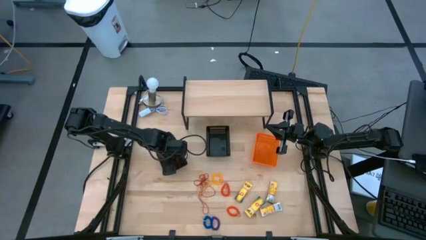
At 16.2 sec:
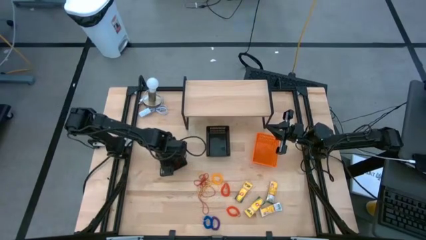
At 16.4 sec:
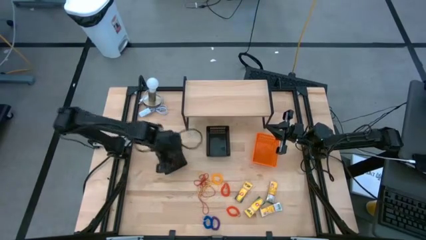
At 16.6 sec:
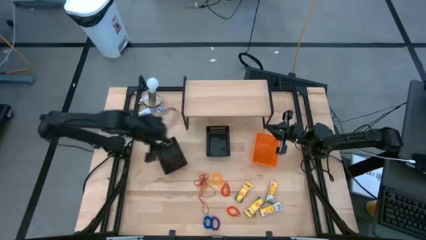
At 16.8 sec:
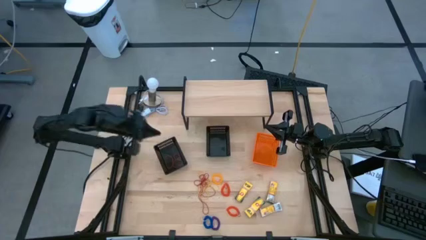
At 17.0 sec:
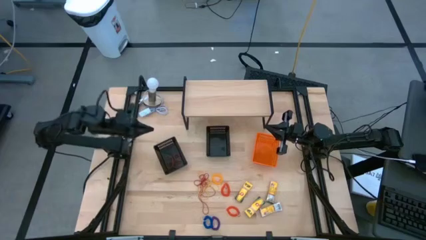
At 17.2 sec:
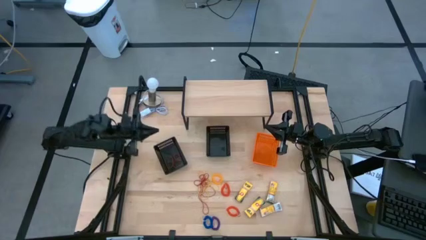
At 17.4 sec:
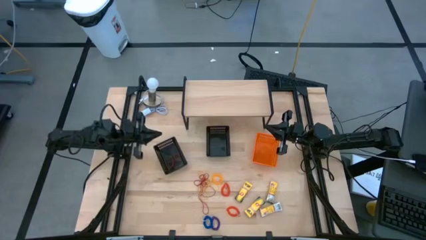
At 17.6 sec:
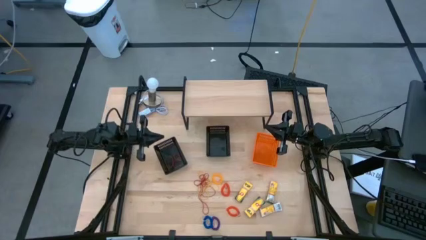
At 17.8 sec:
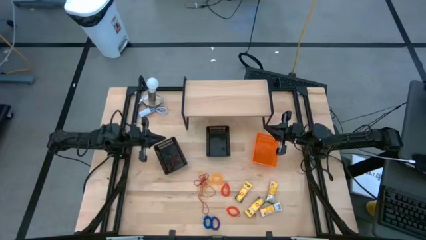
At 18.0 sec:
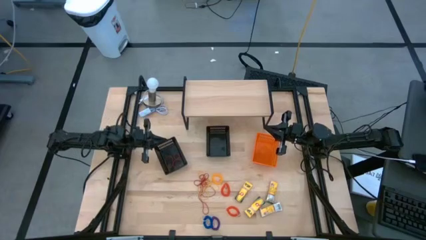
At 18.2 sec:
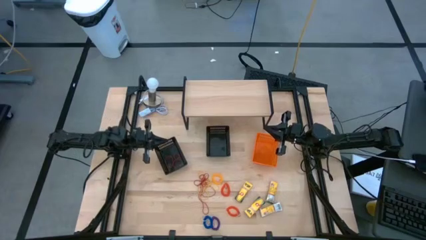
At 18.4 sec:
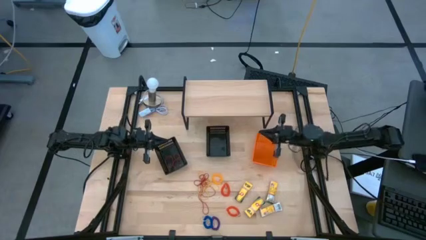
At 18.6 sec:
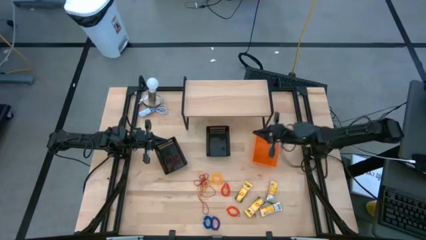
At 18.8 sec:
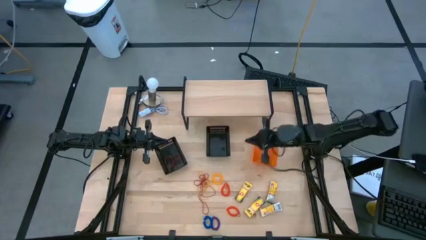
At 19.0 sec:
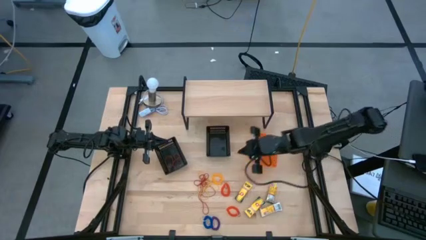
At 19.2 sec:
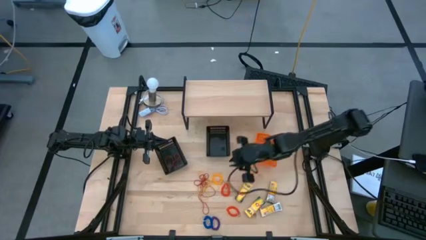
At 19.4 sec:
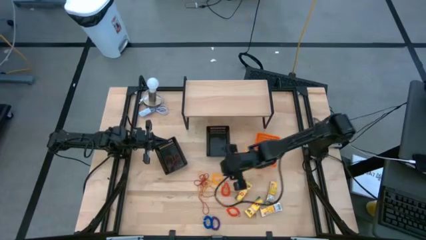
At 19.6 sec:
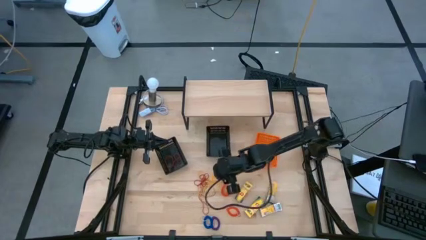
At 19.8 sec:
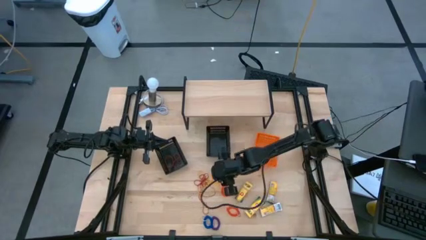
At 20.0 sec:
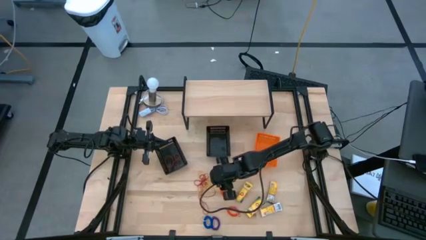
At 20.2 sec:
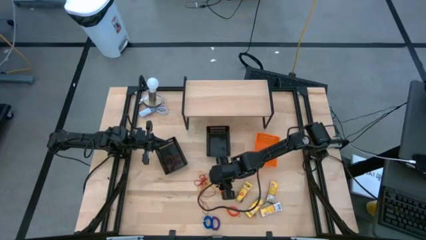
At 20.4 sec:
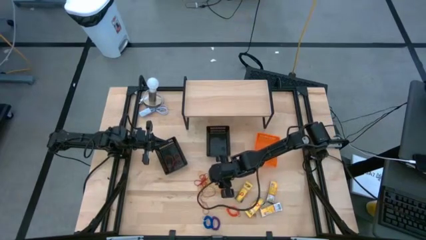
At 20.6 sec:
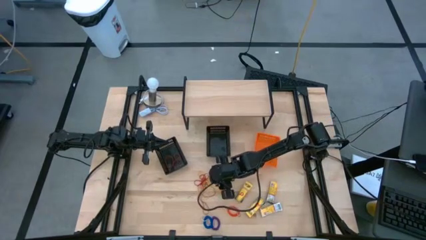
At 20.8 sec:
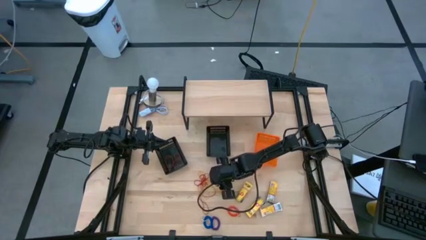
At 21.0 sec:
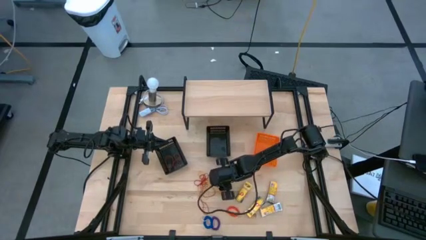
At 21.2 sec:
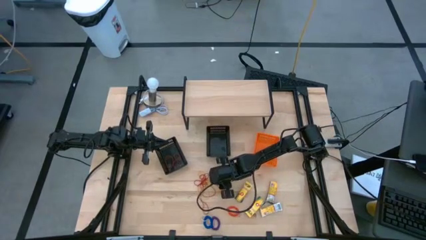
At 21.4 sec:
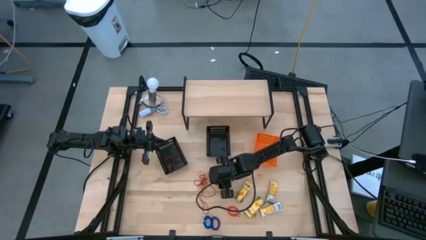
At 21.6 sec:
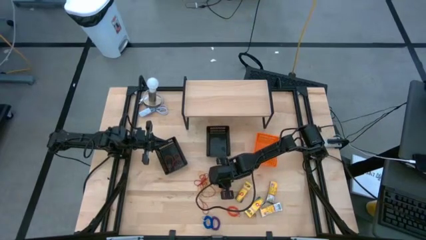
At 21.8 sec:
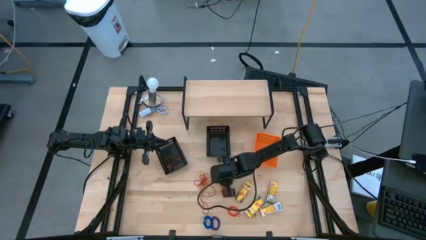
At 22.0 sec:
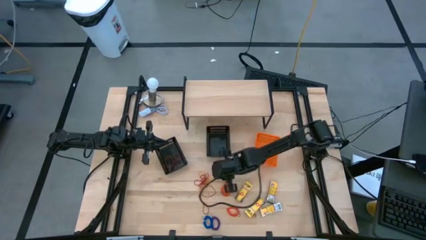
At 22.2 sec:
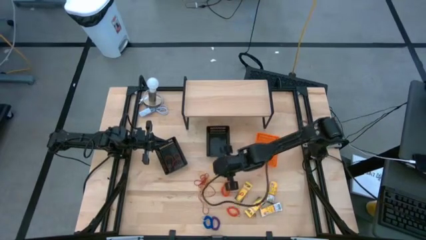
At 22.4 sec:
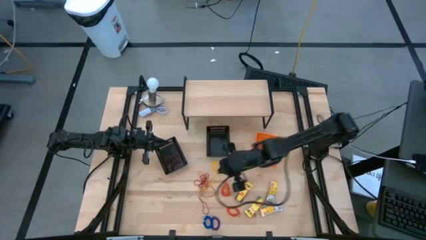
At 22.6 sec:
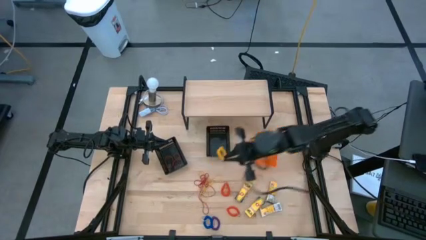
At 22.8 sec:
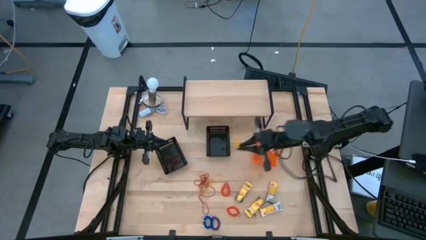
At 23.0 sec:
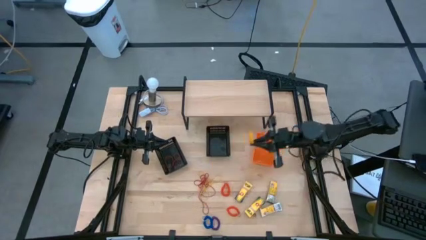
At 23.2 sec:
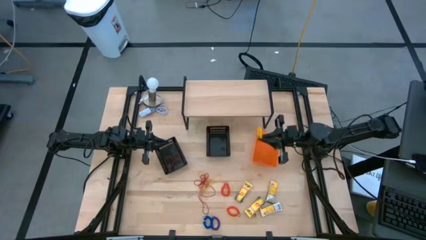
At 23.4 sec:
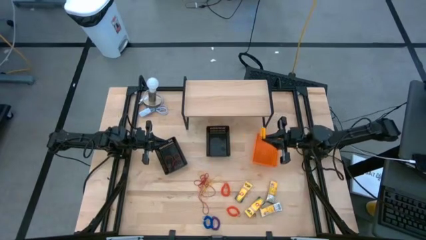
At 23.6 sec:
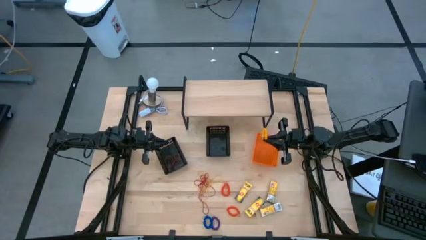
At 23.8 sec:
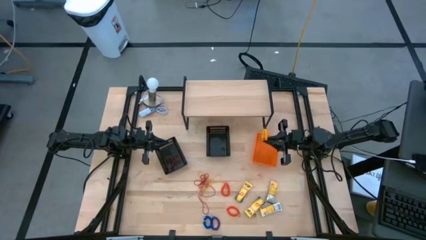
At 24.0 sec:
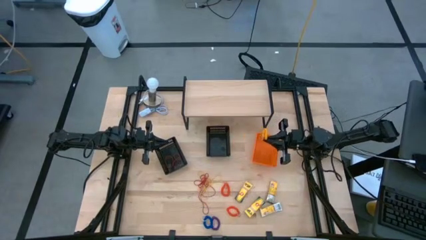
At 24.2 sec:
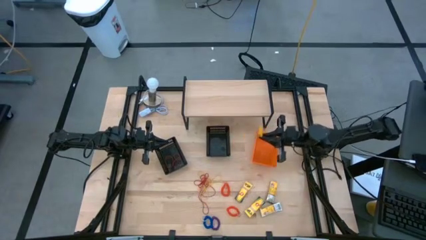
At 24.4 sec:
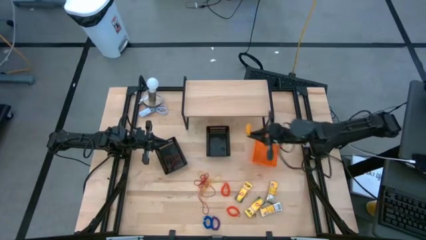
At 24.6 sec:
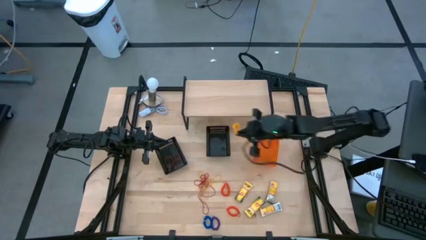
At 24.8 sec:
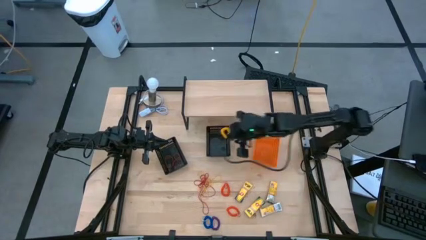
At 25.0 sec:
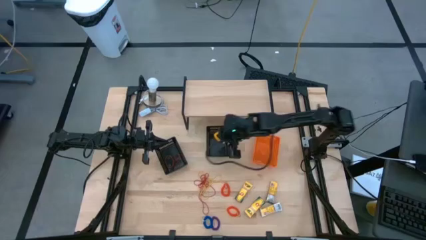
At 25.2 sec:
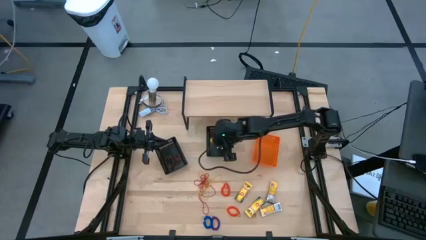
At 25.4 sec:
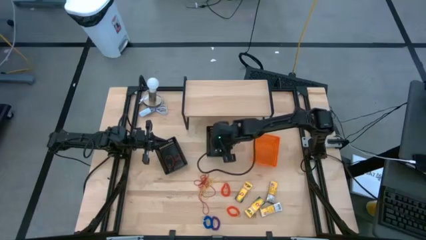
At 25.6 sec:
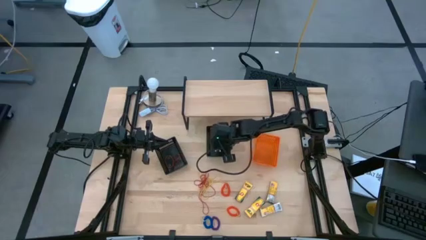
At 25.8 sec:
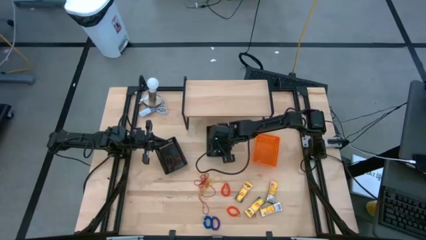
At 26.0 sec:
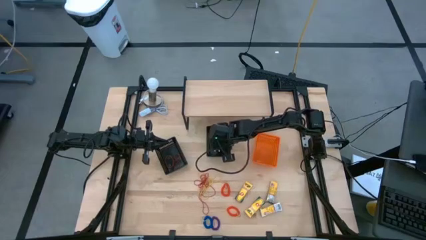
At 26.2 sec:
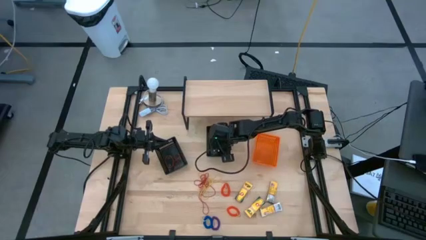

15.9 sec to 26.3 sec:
Task: Pick & Place Office Desk Supplies
Put the yellow spring keychain into the right black basket
